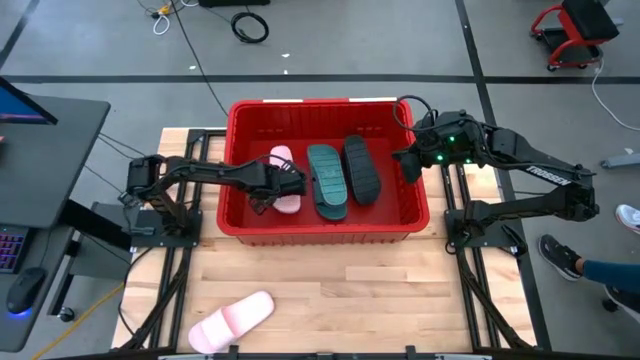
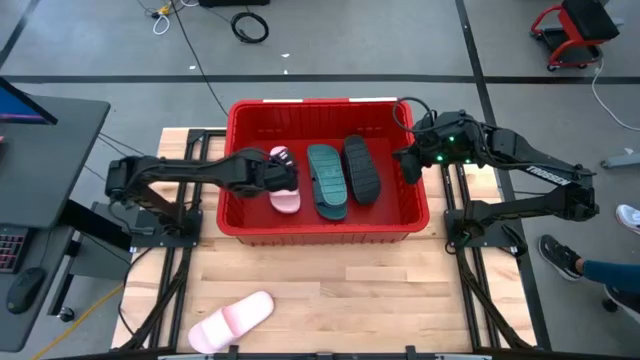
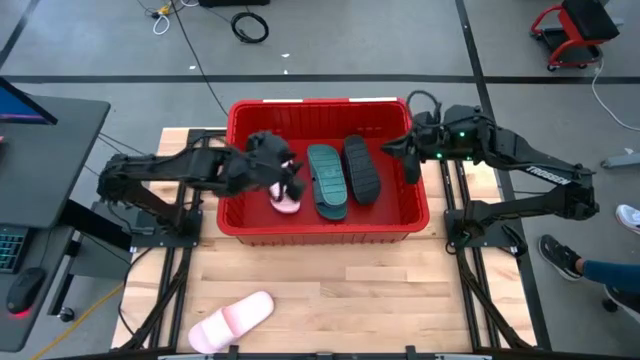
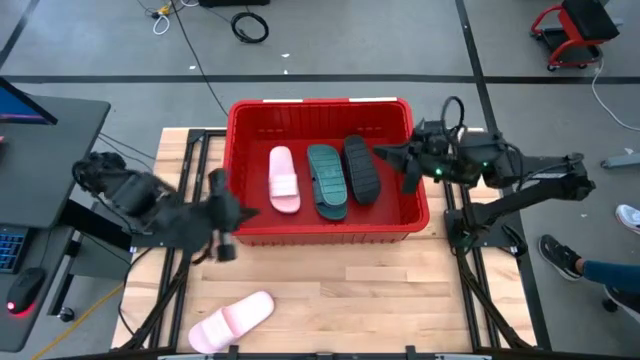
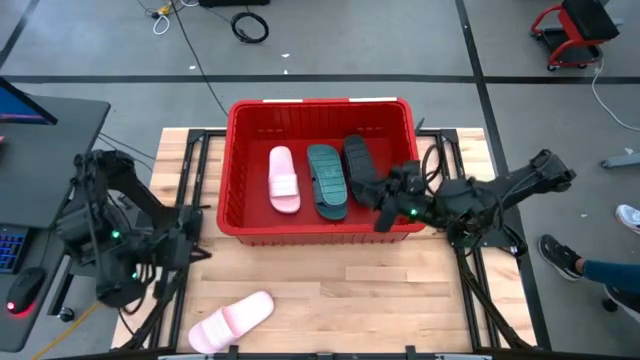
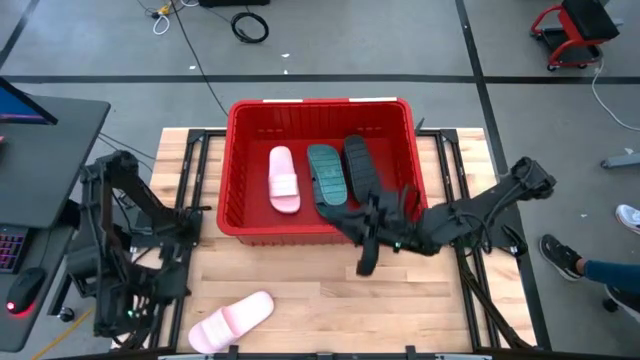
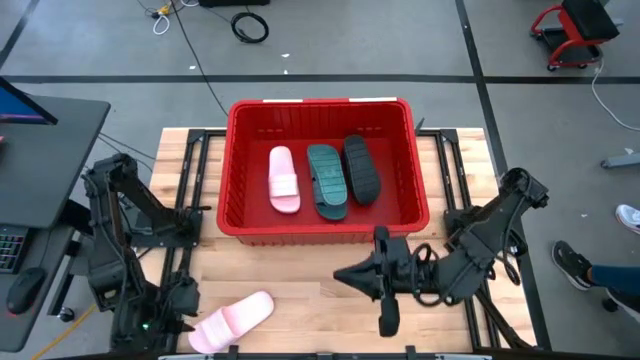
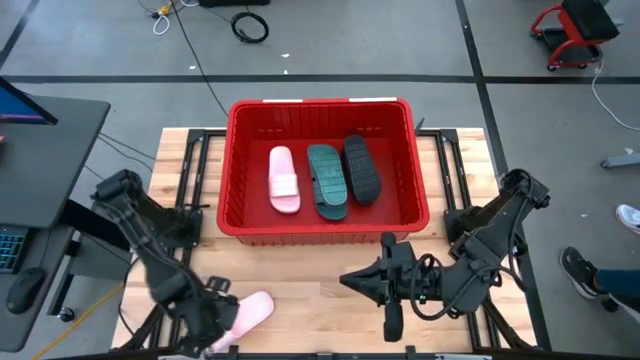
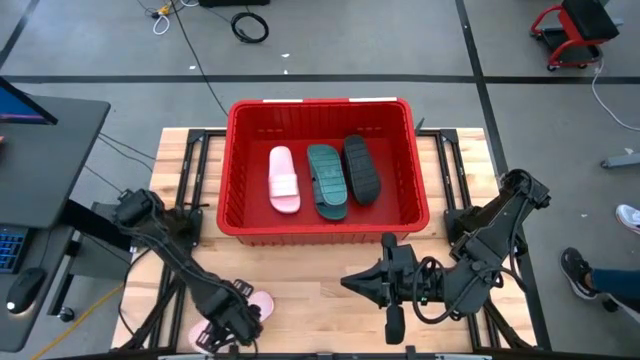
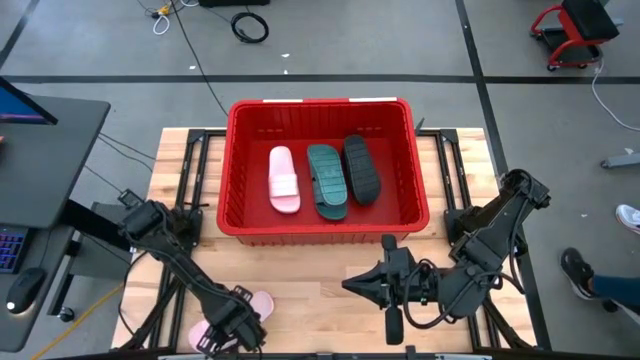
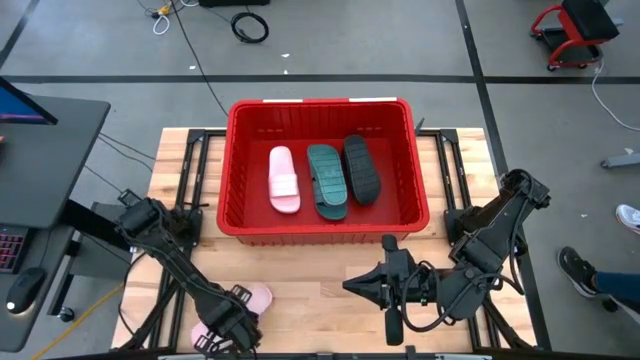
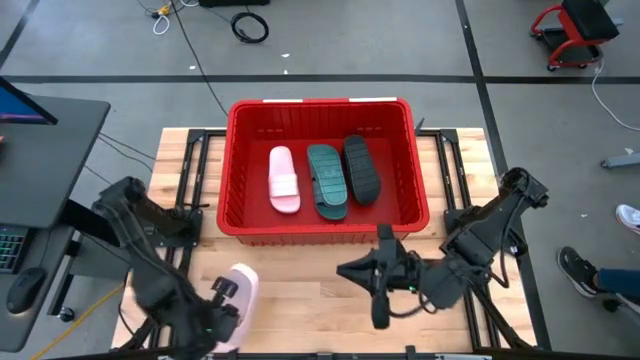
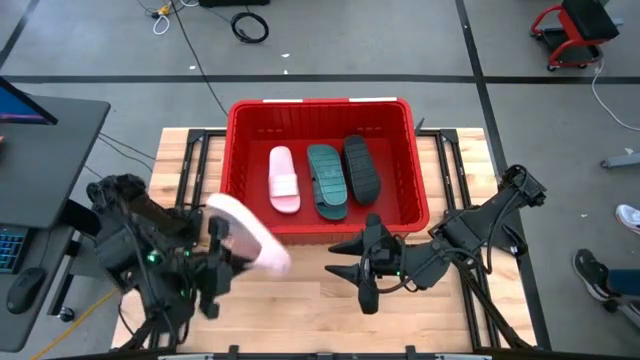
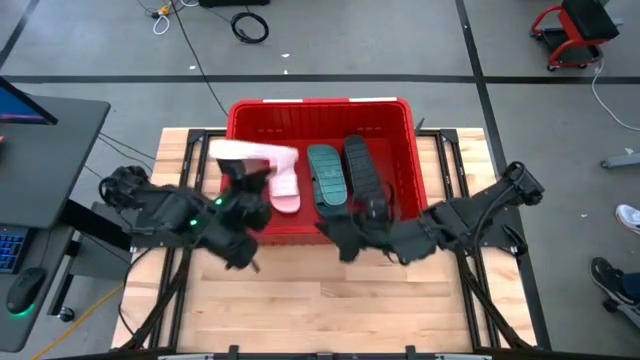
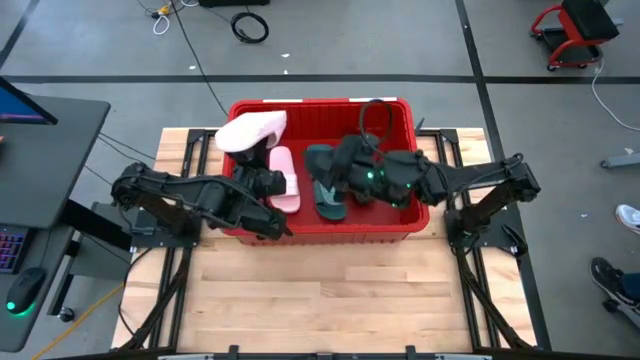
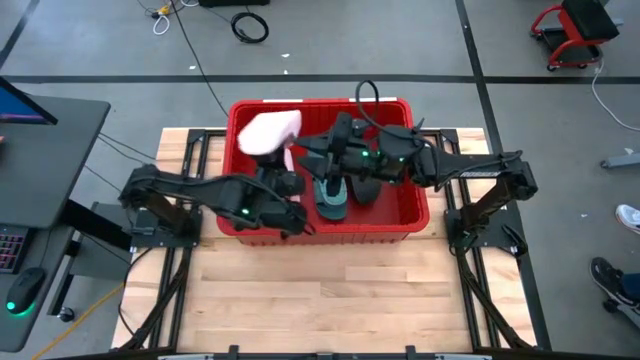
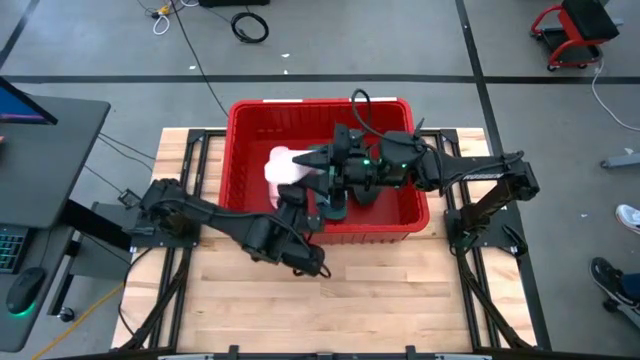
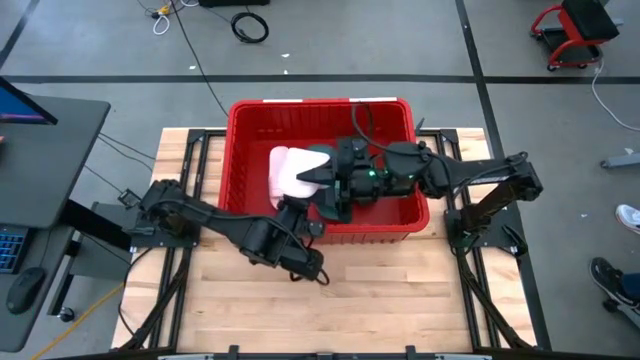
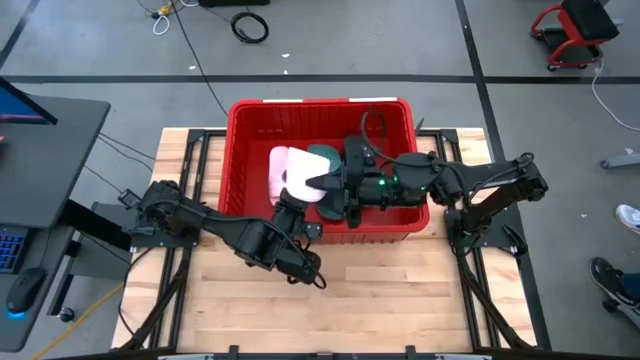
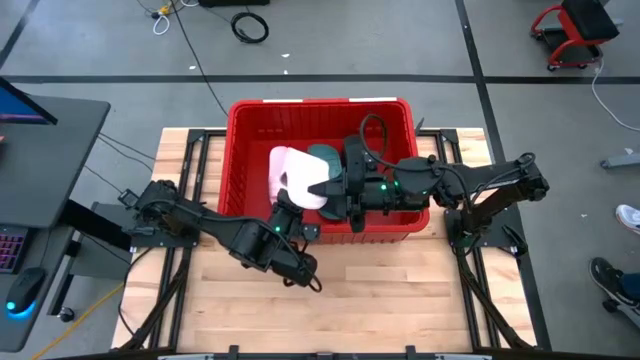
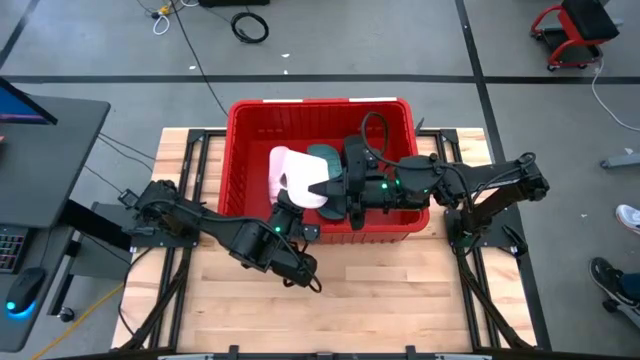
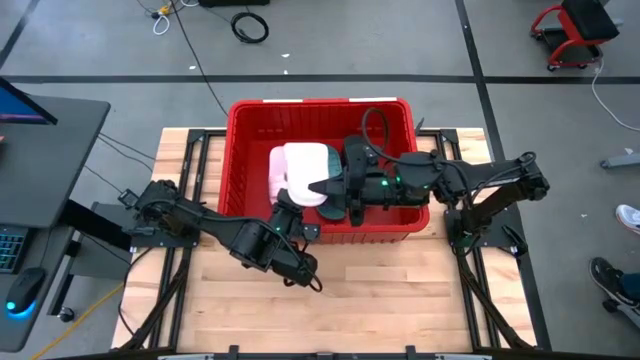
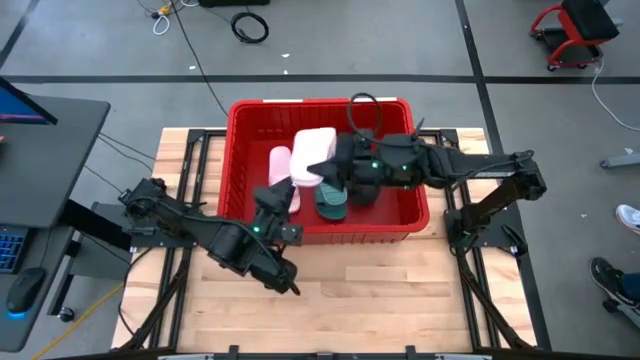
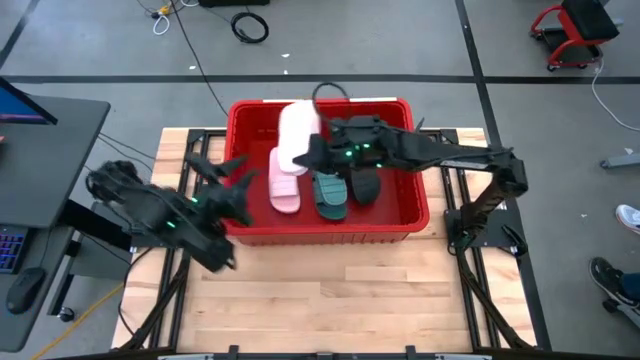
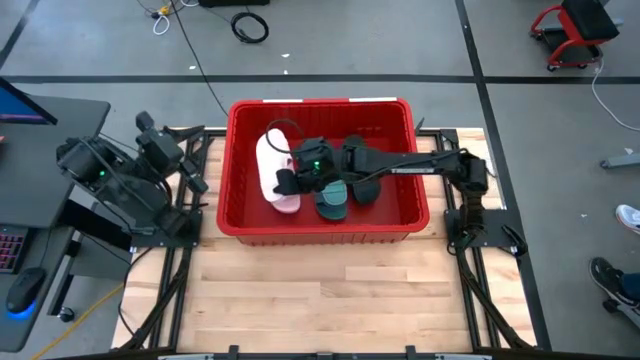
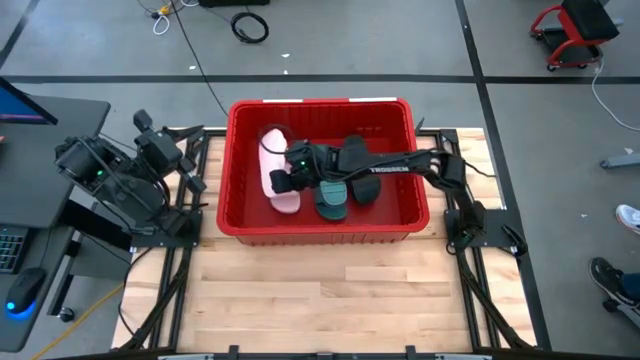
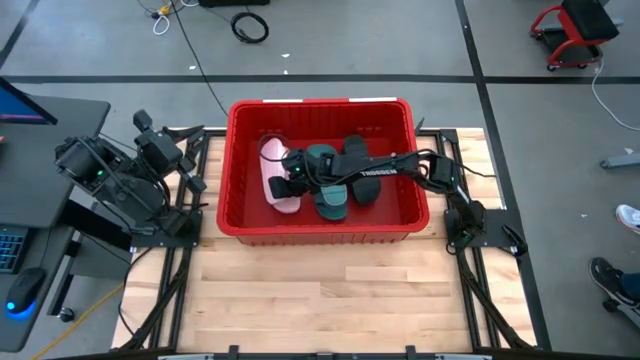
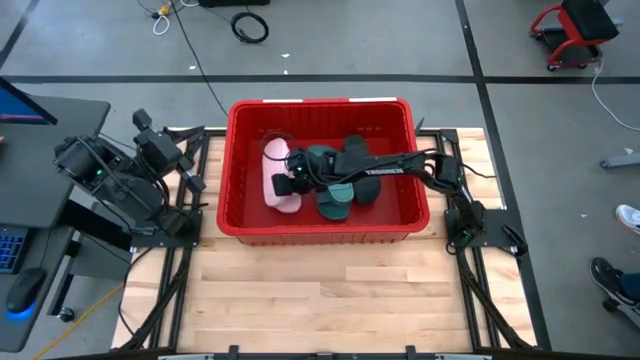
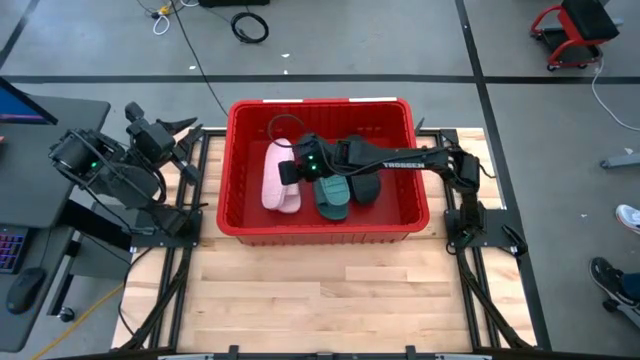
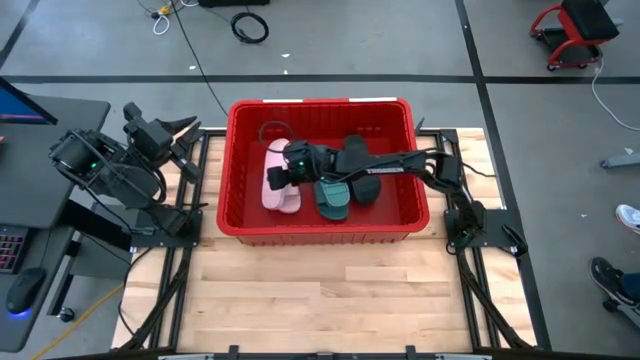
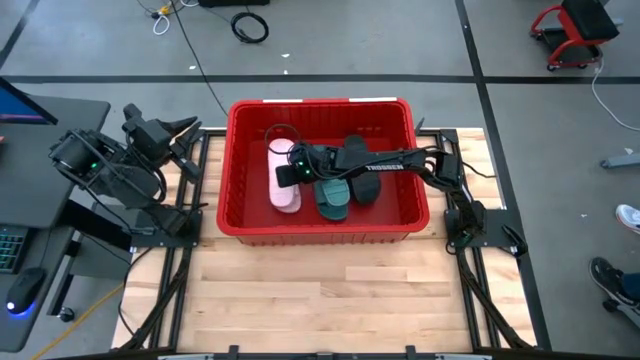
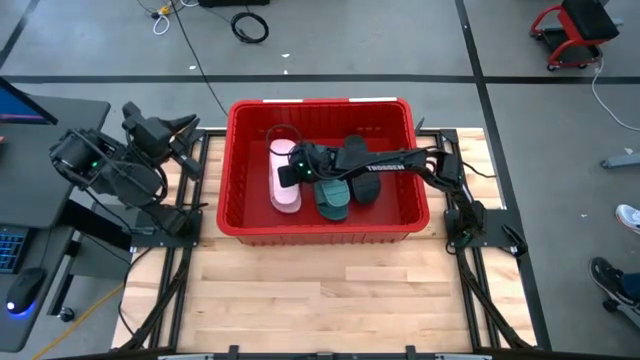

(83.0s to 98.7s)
Task: Pick and place slides into bin
Put the pink slide into the red bin

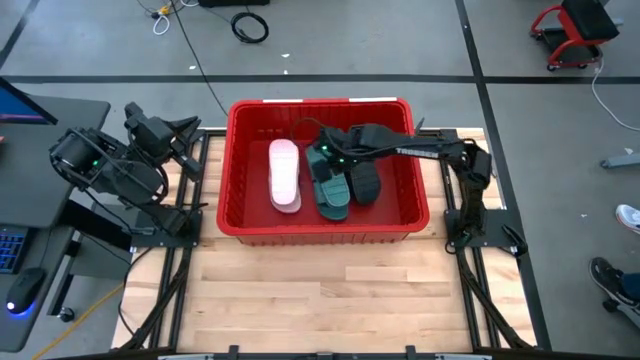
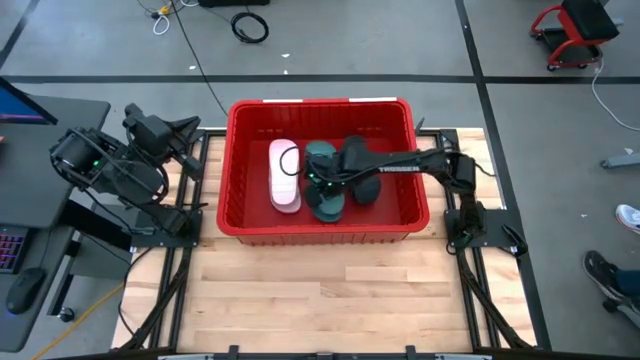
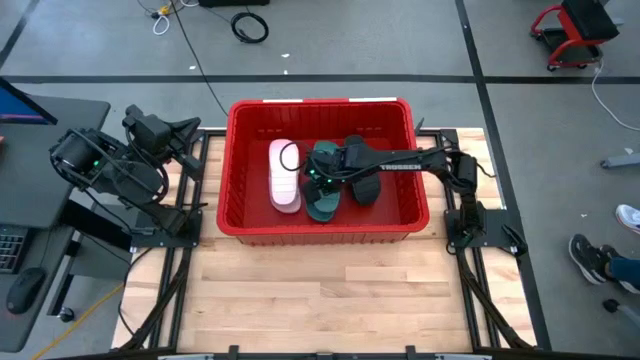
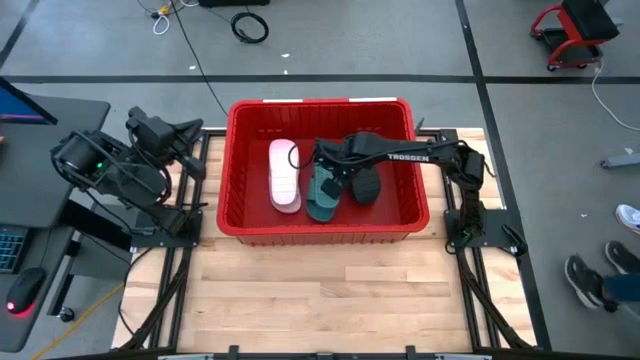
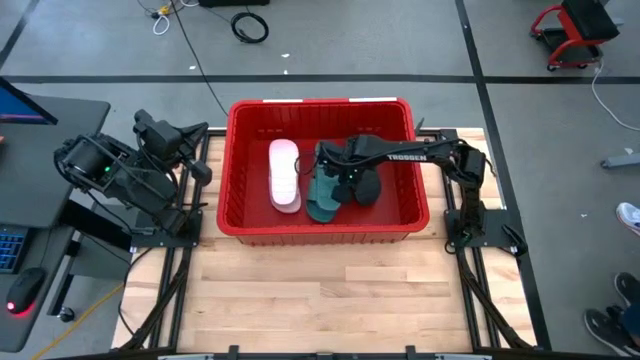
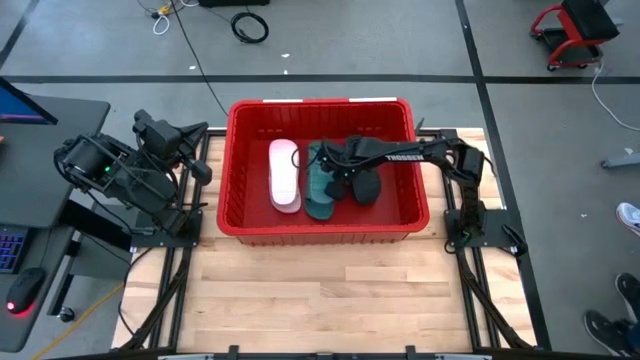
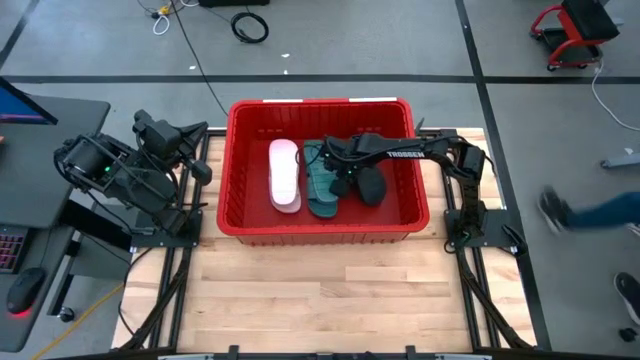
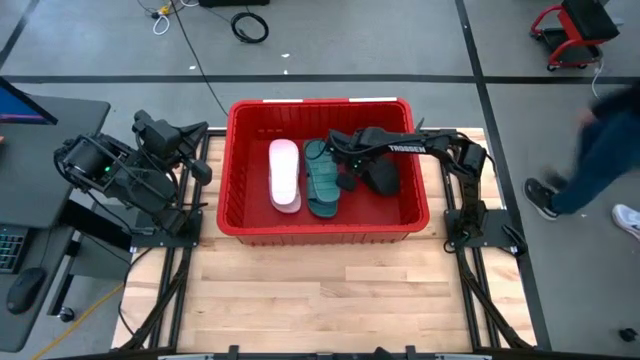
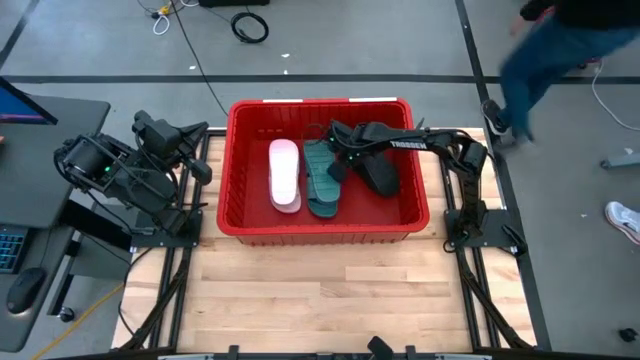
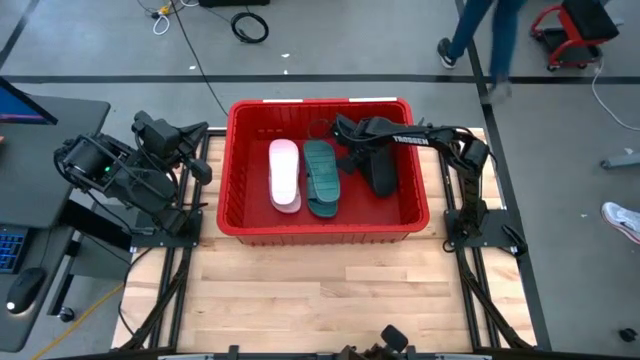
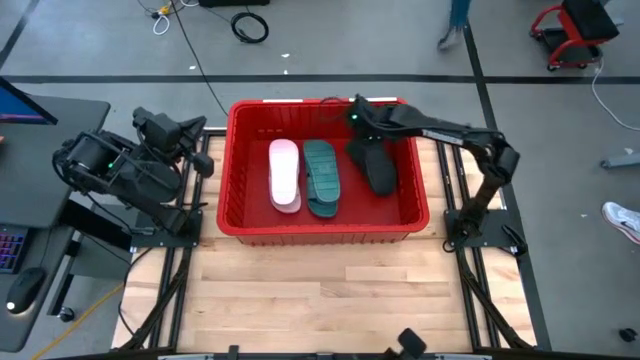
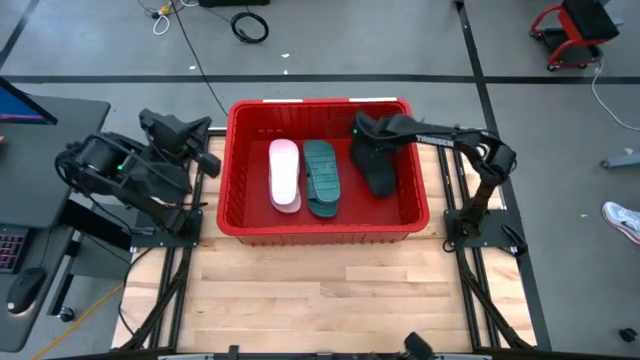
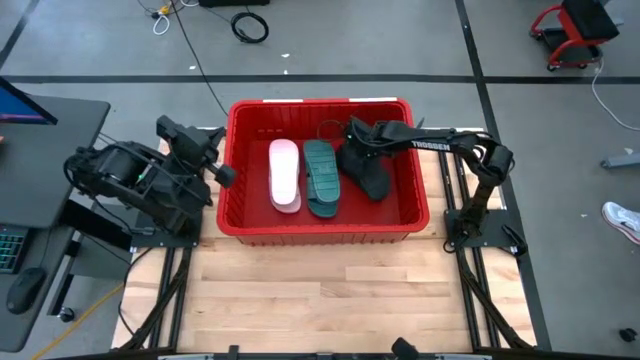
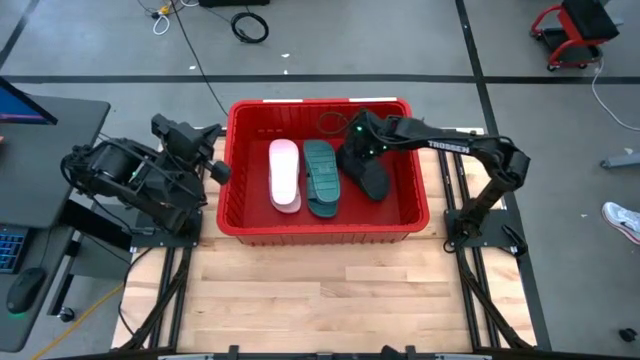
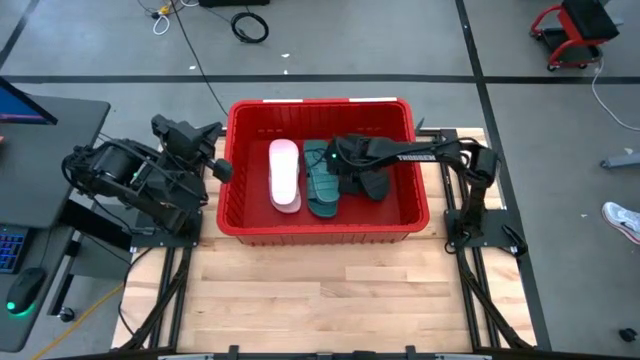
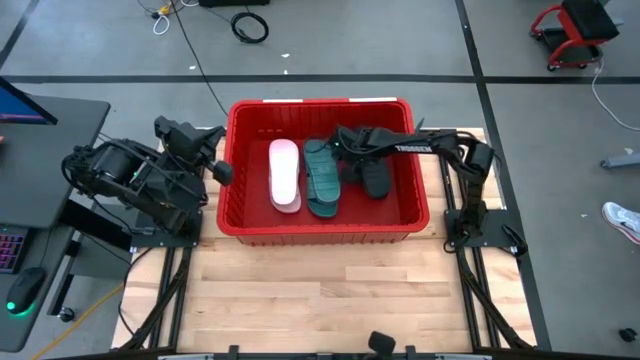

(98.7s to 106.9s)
Adjust the slides in the red bin
